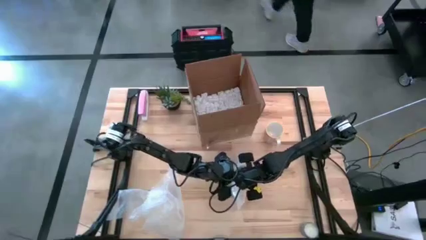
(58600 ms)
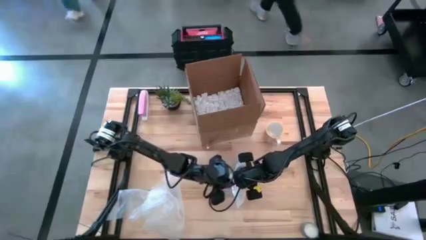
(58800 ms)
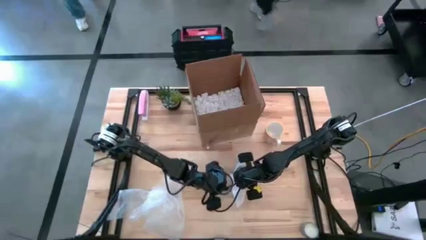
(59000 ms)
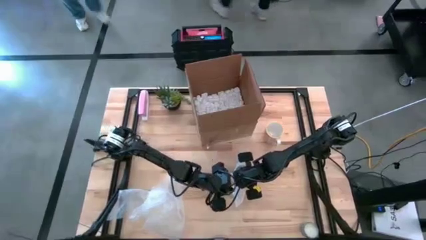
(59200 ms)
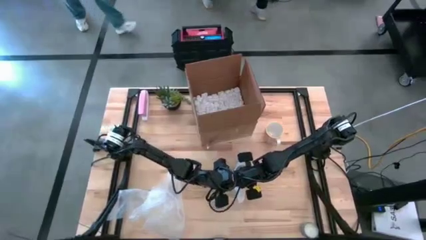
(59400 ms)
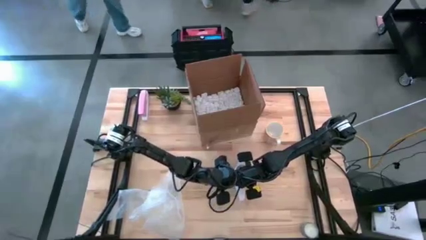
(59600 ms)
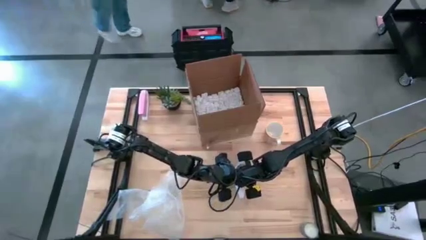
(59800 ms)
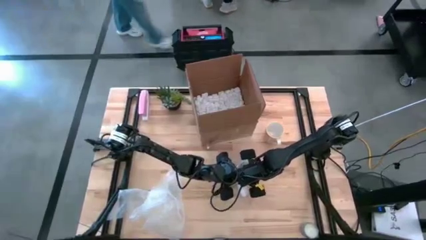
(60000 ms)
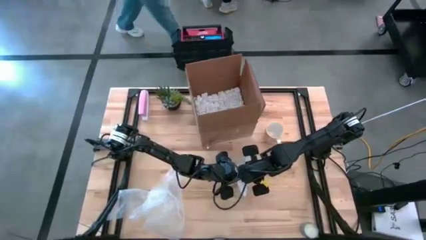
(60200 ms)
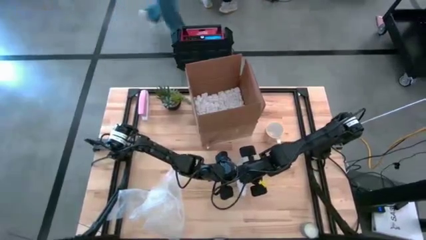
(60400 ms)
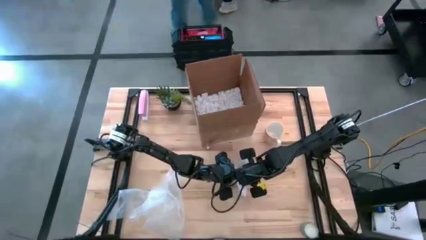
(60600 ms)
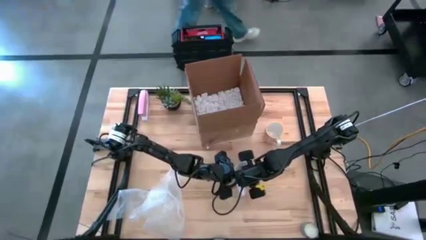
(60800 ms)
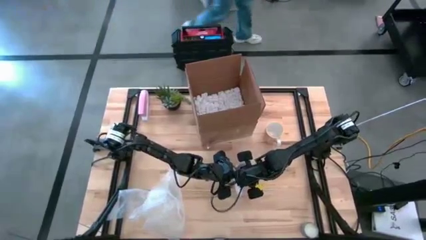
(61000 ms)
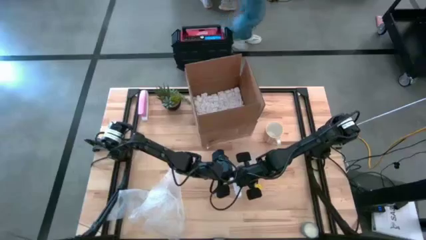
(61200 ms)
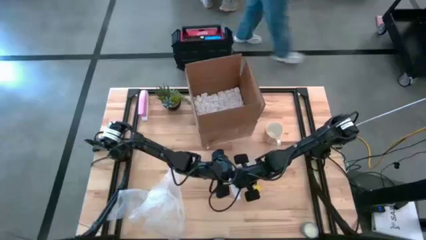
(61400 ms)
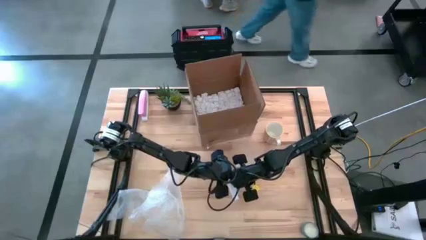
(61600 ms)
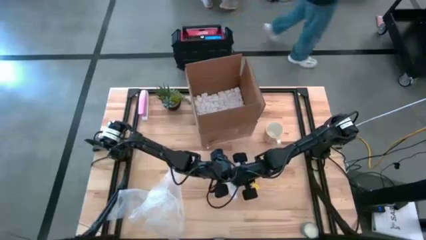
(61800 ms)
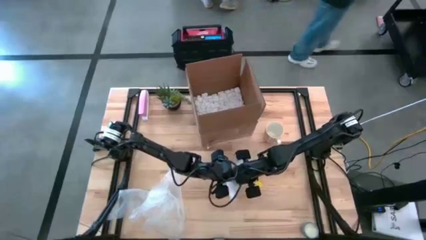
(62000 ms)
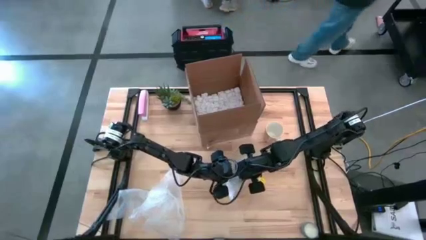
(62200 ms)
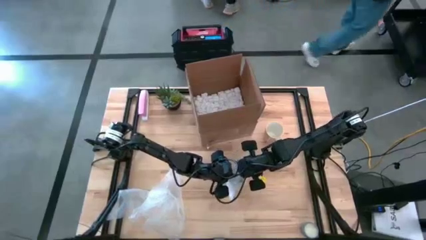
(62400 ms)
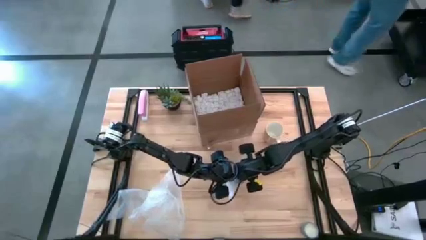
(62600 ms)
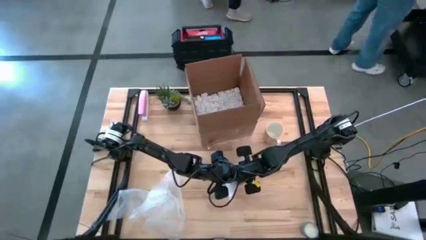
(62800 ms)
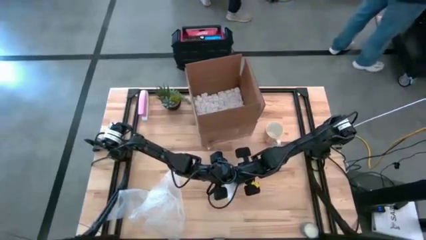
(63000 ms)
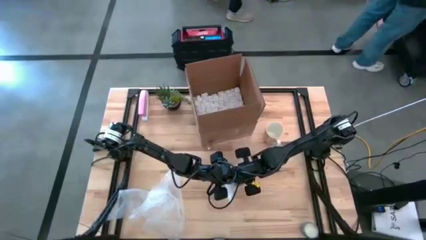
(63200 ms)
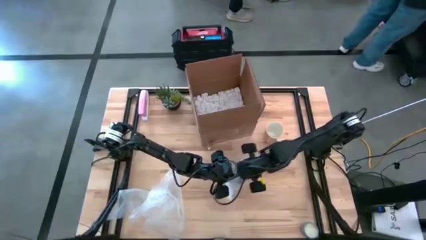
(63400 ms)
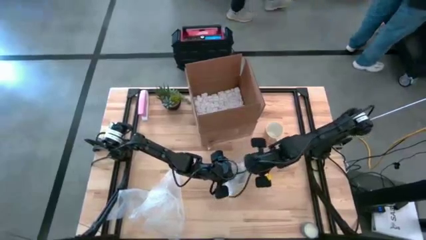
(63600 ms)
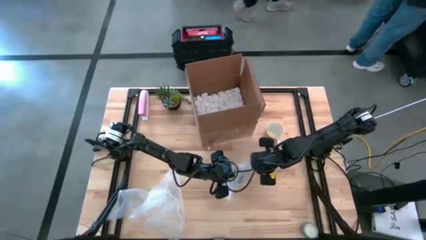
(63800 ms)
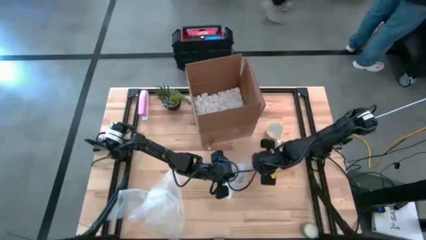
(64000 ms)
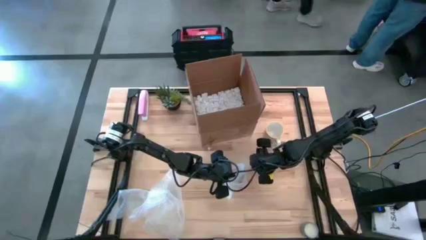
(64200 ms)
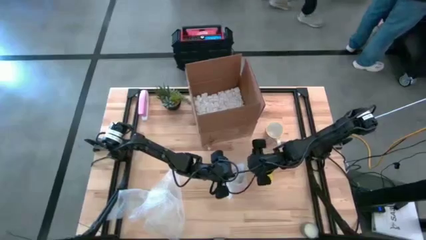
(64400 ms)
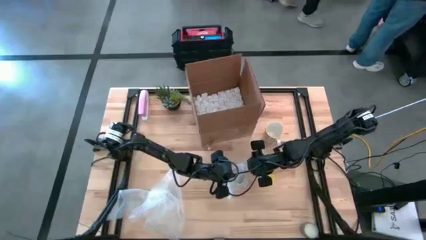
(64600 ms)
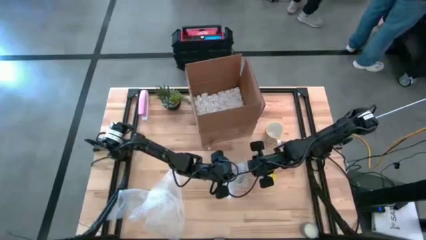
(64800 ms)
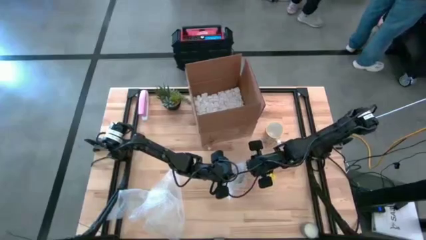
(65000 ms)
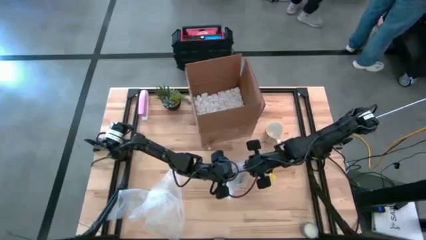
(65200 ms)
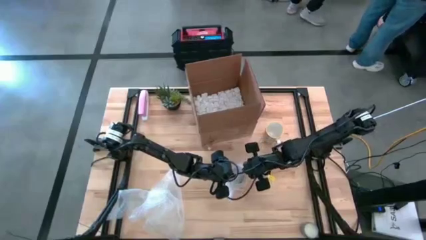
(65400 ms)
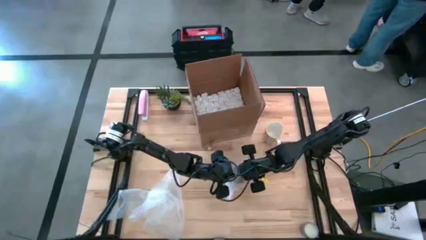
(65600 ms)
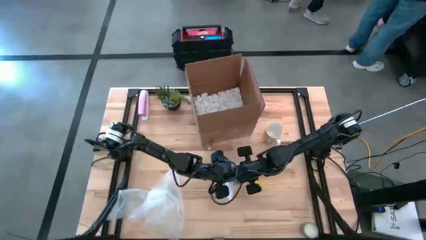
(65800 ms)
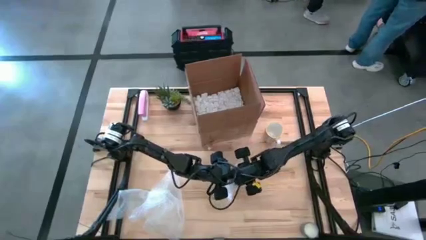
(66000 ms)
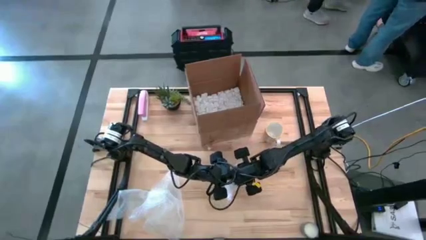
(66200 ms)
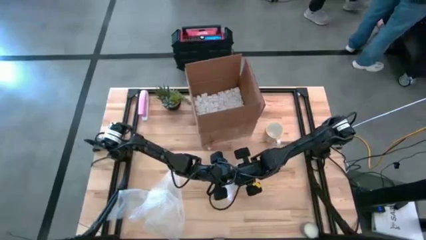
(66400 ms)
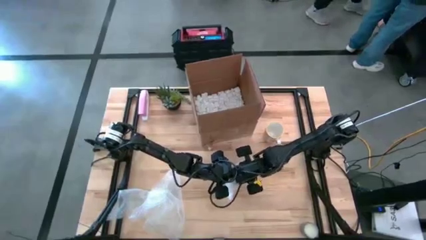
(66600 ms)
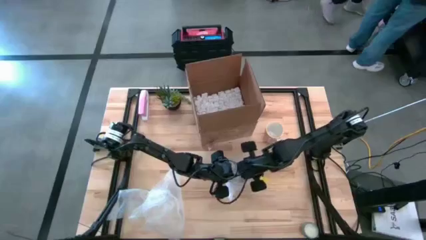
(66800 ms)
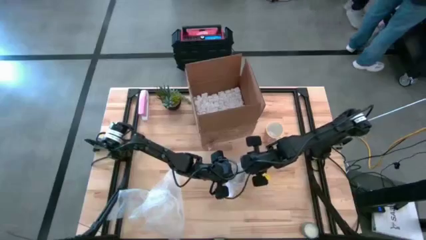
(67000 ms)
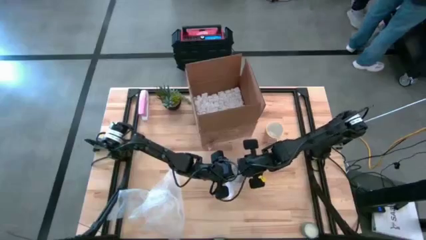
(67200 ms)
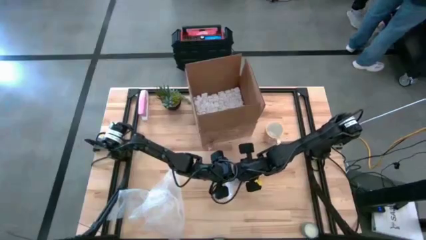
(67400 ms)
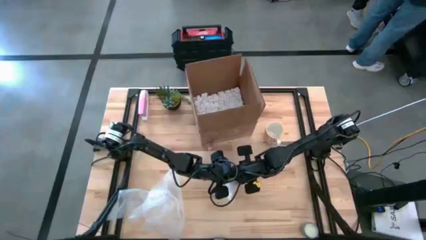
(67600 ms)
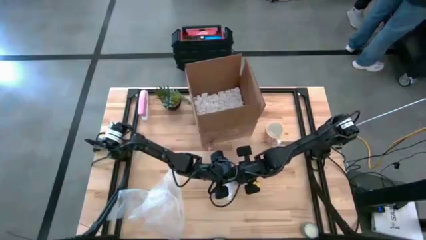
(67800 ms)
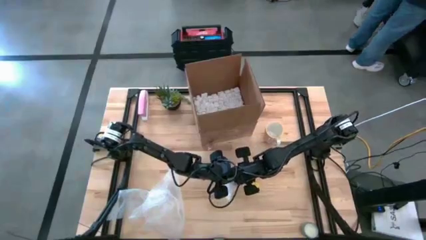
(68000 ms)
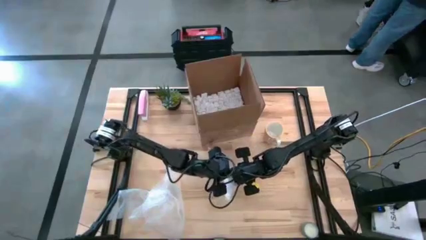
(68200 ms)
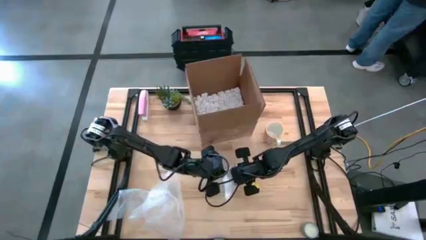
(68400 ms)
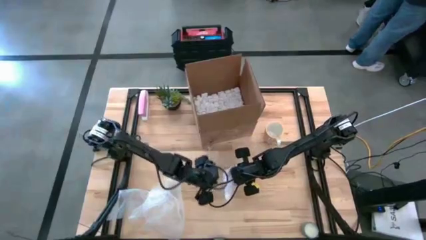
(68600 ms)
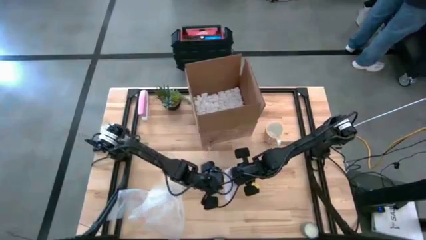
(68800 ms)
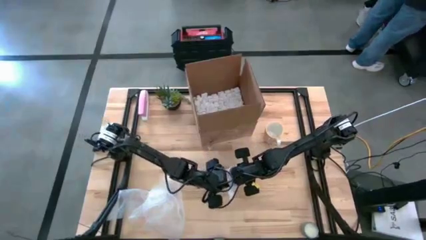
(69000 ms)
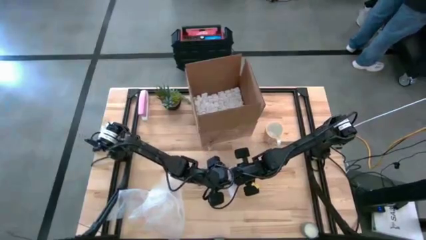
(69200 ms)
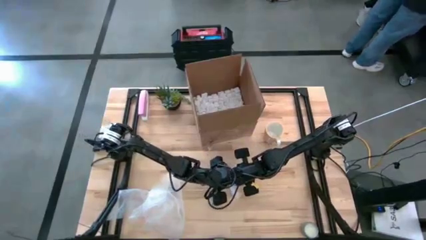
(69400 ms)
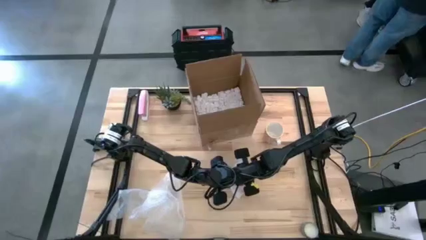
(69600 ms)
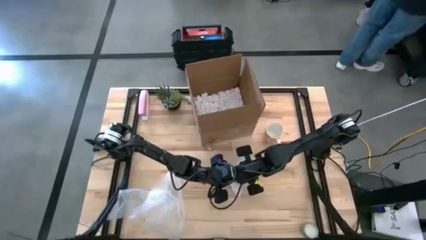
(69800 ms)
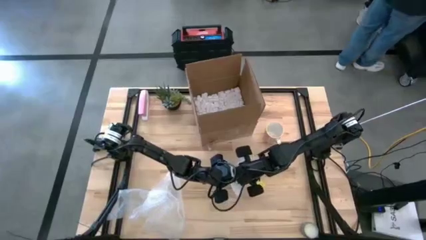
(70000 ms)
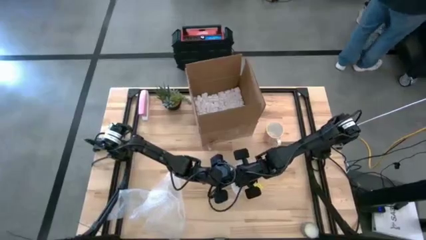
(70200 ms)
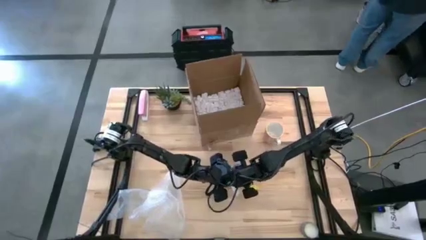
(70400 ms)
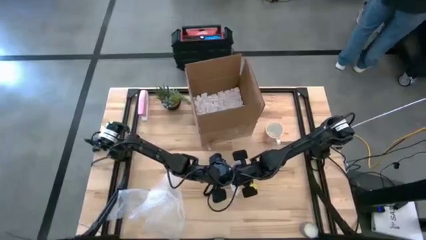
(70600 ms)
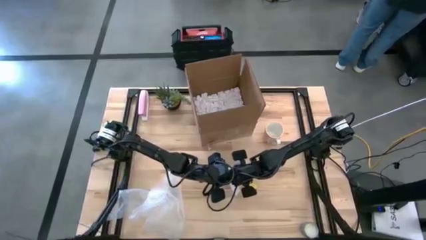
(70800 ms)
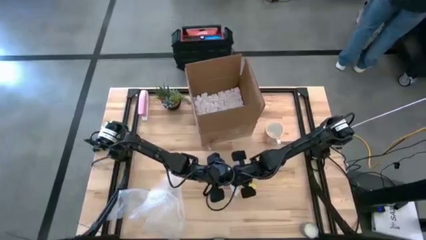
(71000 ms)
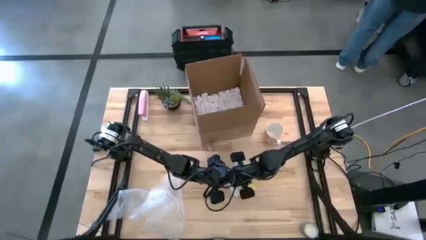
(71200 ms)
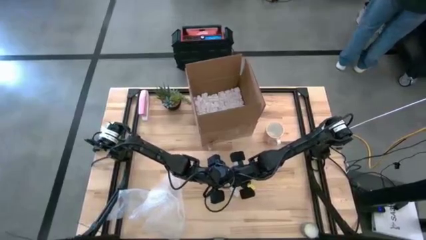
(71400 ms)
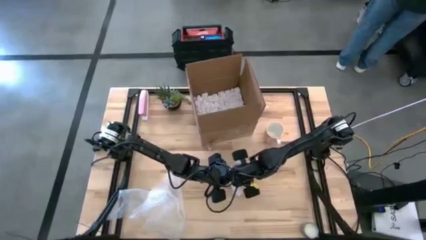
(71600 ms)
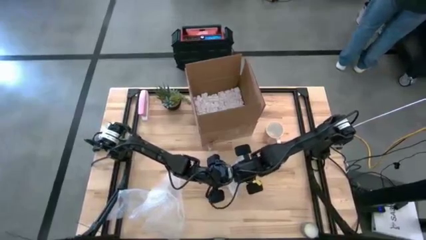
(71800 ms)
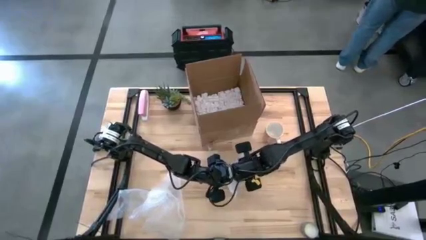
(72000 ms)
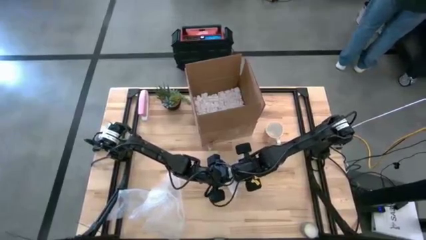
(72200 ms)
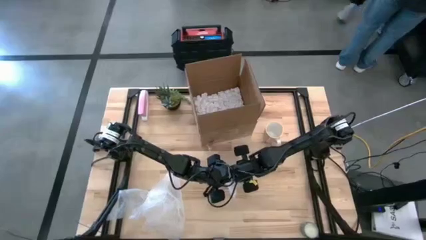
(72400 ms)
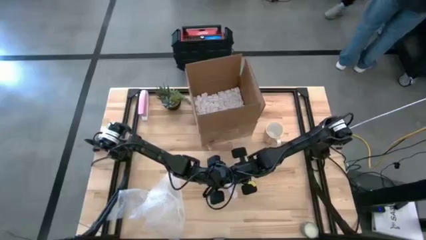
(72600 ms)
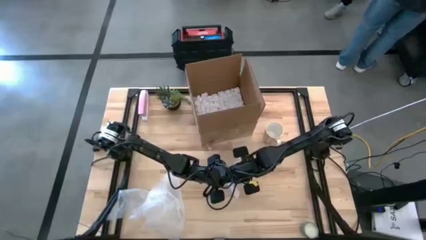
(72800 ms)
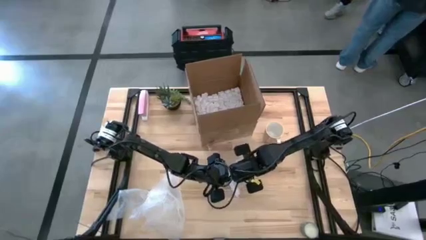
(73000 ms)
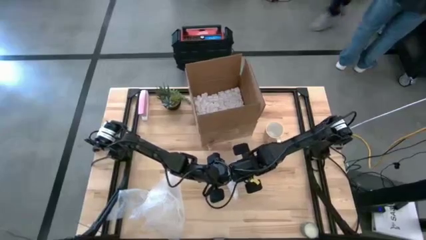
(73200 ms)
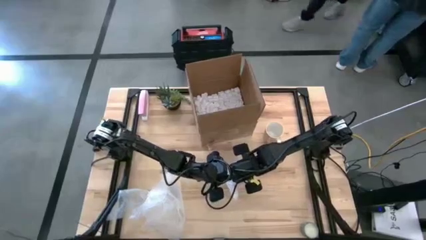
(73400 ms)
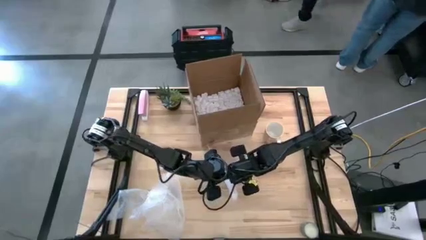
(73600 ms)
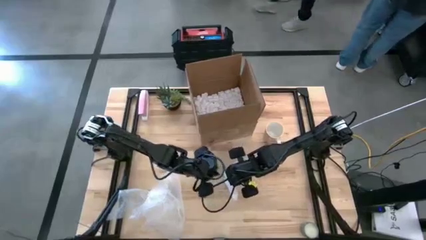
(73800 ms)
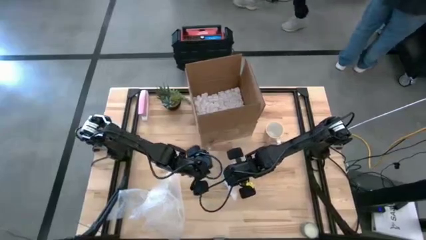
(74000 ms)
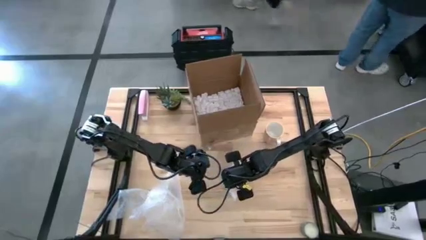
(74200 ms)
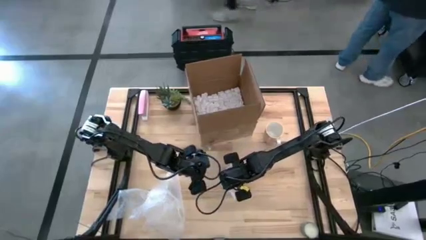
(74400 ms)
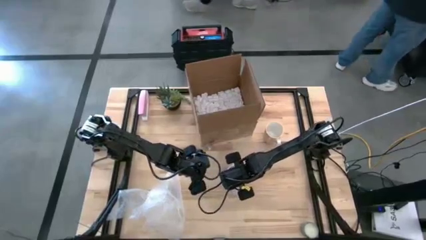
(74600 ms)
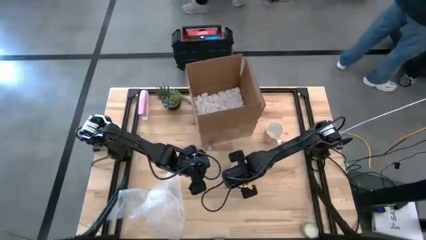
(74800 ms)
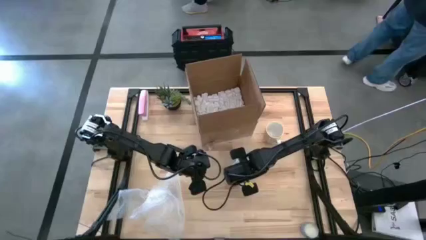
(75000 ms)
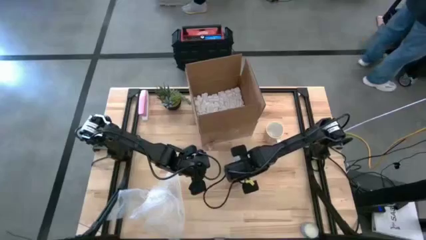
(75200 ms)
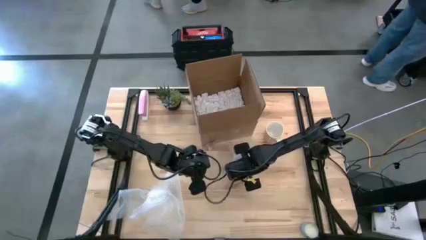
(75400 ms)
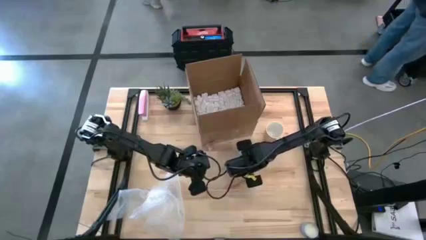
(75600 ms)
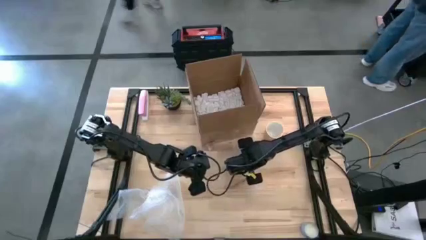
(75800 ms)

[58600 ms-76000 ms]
Task: wrap mug
Wrap the gray mug with bubble wrap
